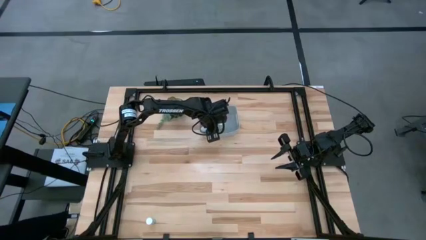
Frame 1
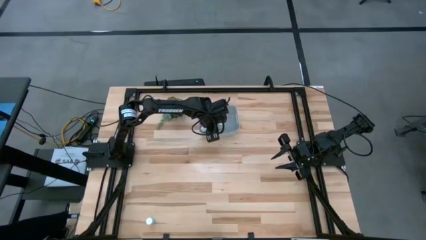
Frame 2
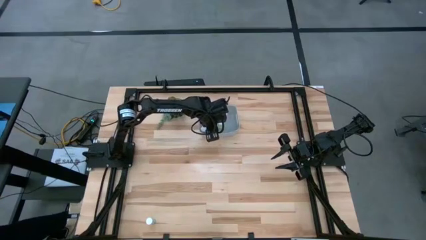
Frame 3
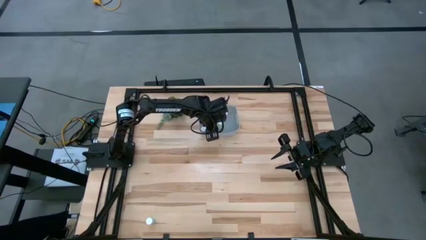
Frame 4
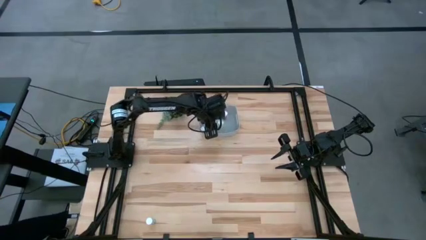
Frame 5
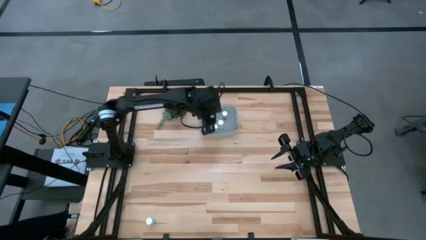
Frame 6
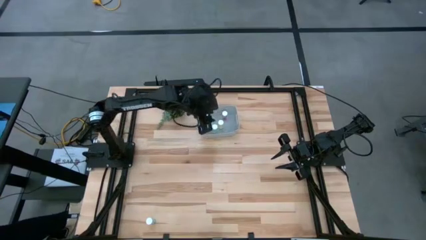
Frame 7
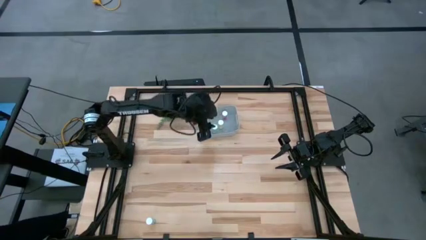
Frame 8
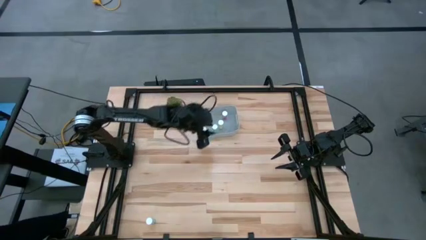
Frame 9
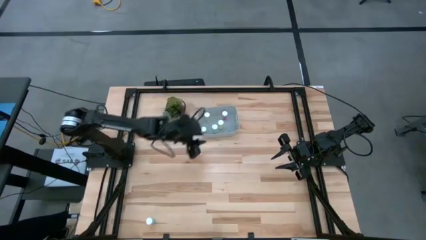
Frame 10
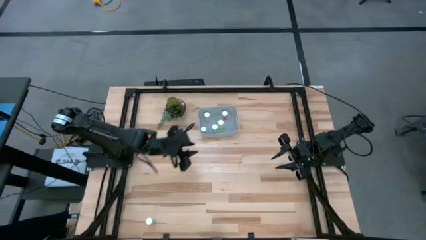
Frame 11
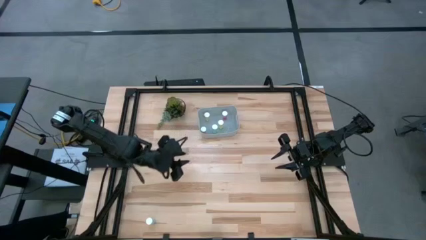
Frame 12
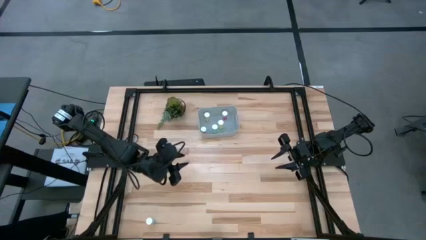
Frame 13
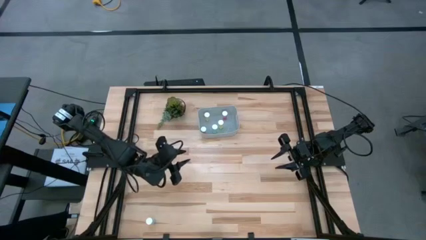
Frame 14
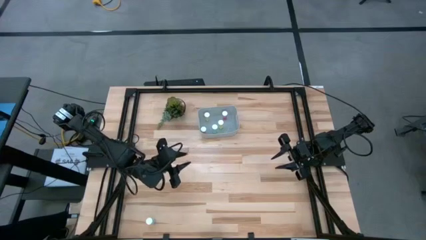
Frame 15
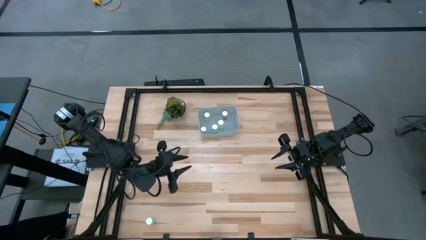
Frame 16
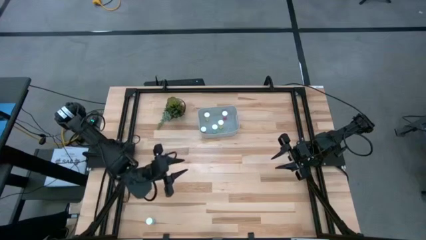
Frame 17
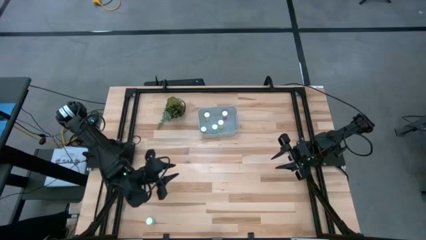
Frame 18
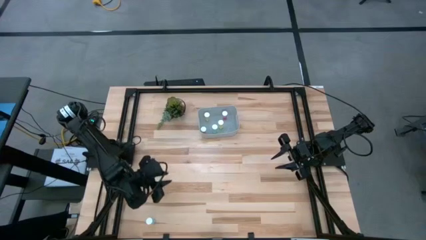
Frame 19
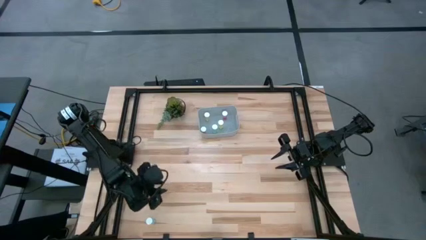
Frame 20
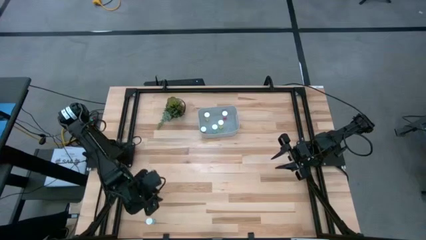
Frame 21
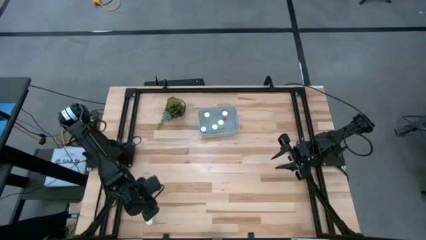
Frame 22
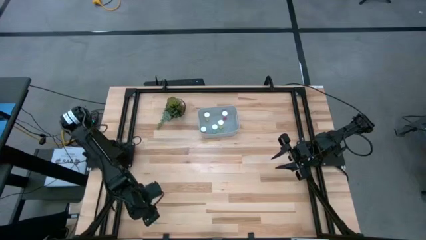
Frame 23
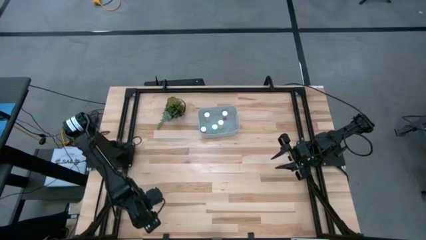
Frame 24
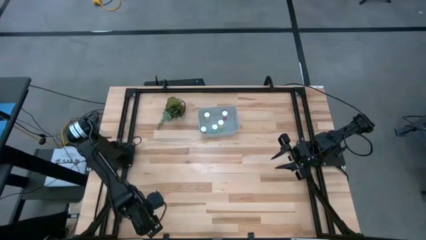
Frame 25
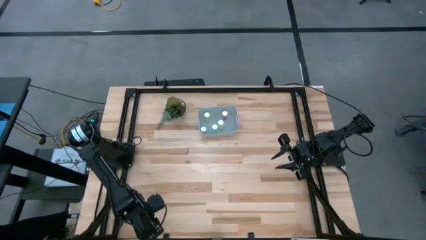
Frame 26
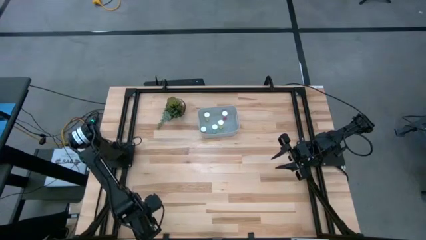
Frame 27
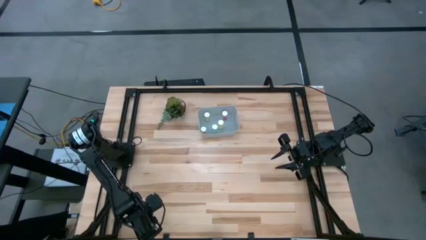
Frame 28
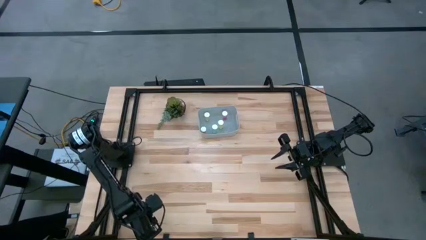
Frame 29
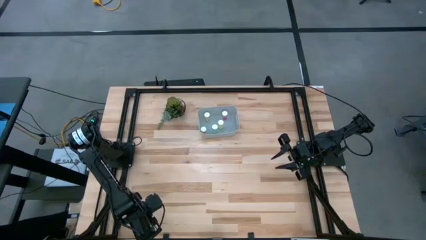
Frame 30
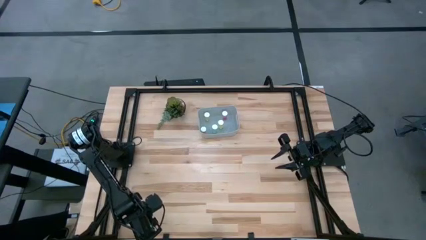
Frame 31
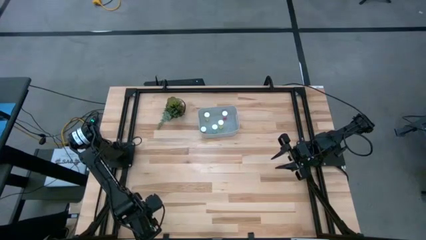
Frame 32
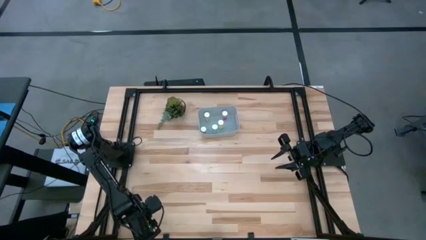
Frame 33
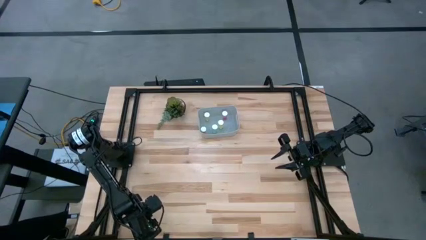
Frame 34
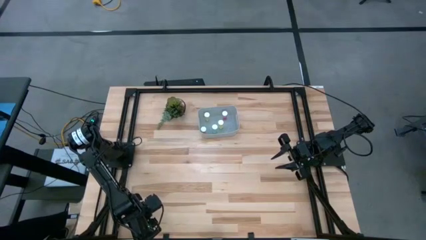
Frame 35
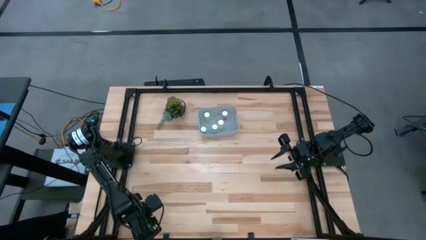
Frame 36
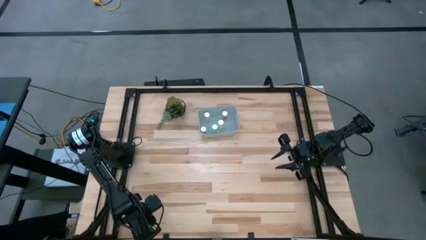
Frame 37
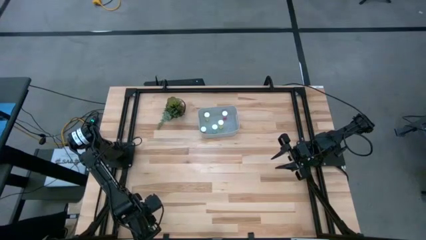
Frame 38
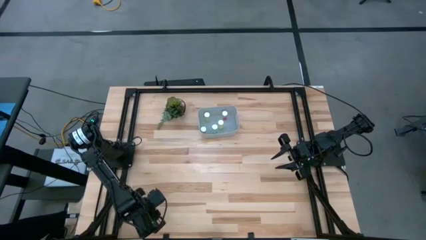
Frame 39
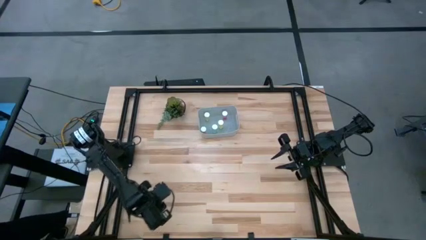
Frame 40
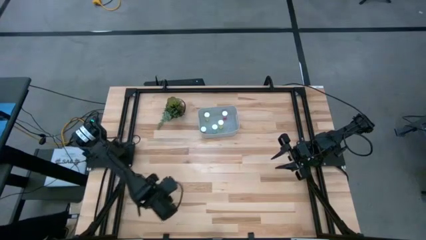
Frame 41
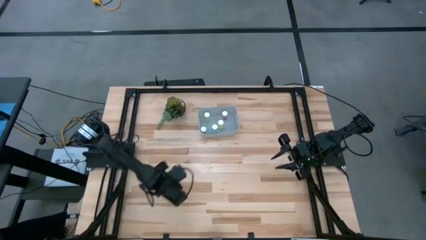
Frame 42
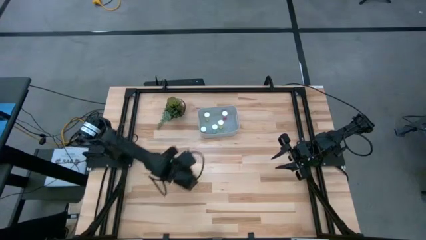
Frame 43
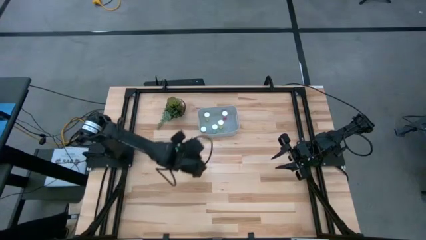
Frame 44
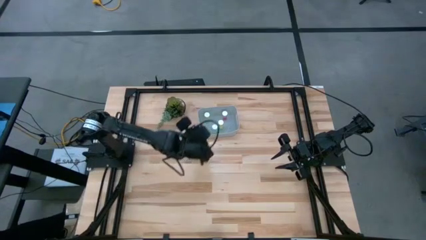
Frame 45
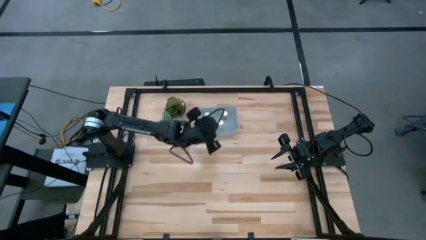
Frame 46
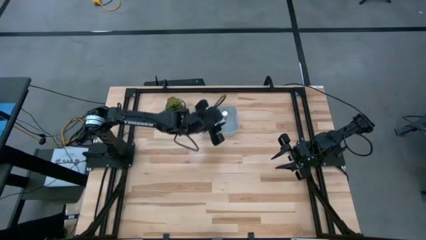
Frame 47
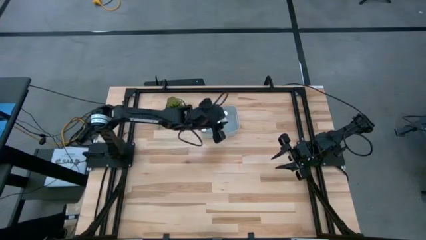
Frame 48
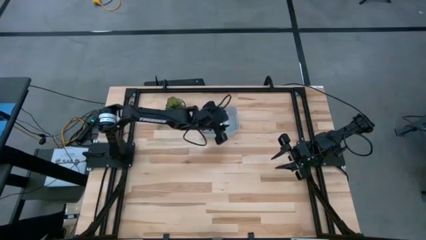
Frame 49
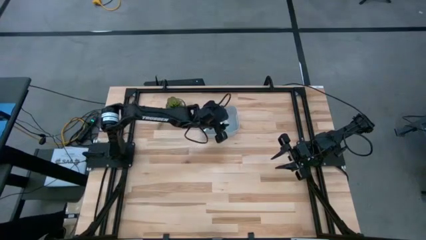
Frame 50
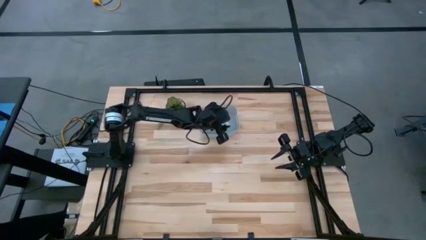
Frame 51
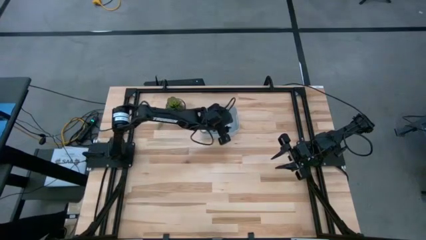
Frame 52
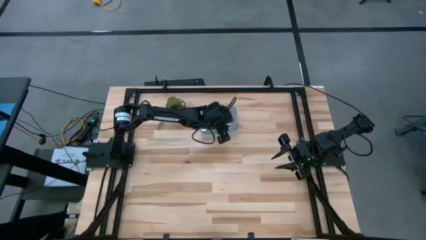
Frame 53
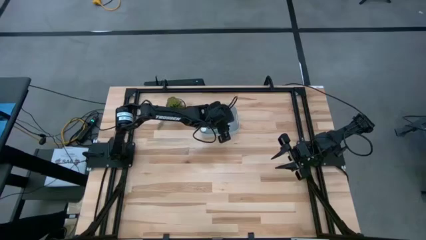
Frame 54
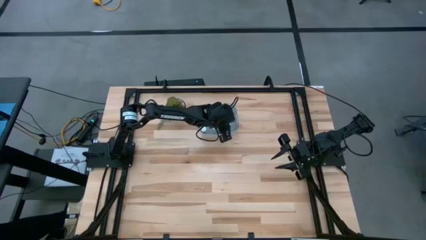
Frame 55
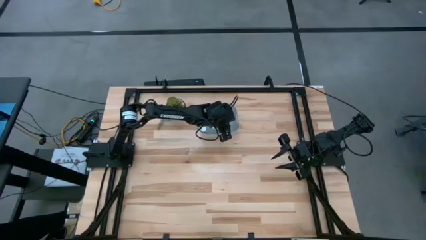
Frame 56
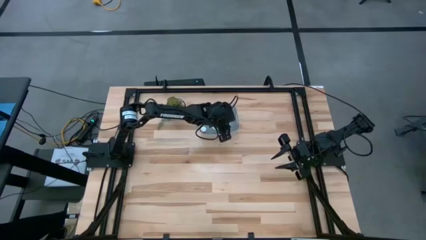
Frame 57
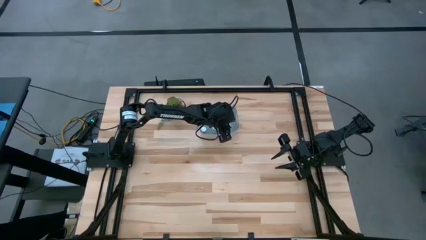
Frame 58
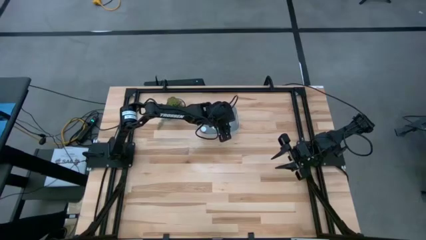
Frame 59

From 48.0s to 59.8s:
Task: Pick and place pill bottles into a basket
Put the blue pill bottle into the bin

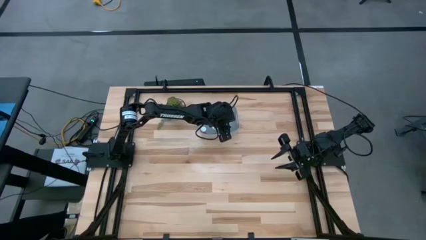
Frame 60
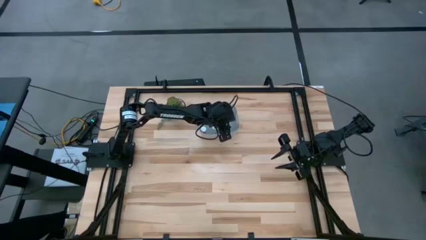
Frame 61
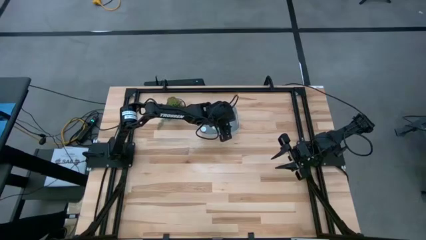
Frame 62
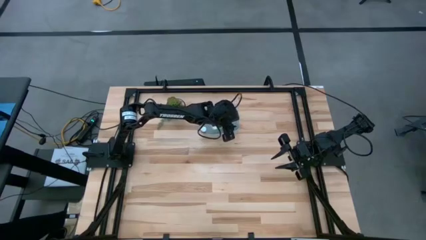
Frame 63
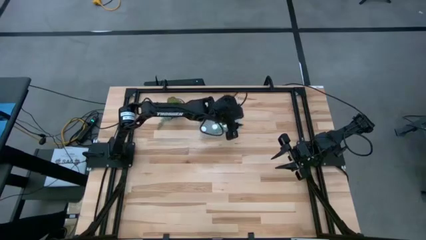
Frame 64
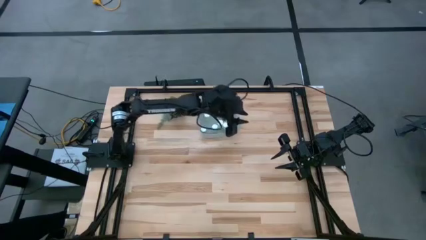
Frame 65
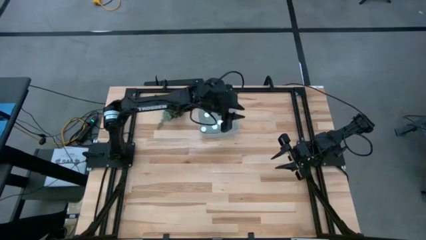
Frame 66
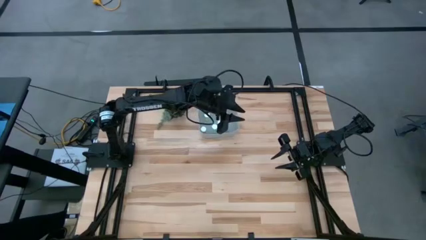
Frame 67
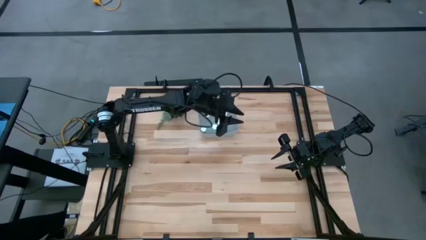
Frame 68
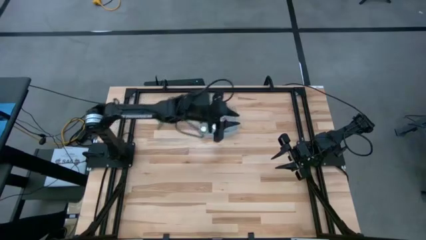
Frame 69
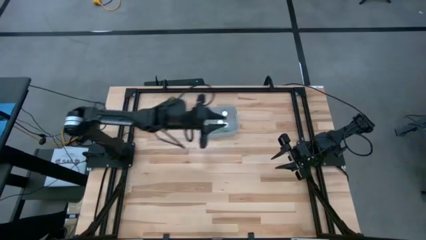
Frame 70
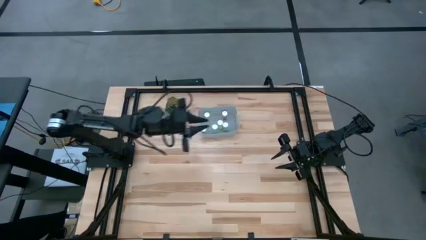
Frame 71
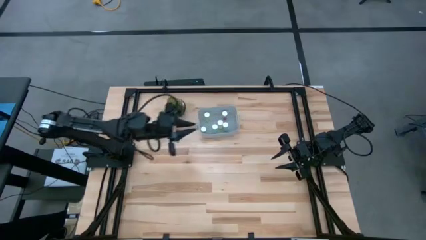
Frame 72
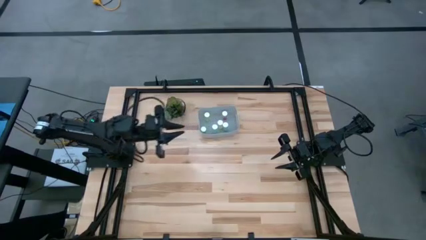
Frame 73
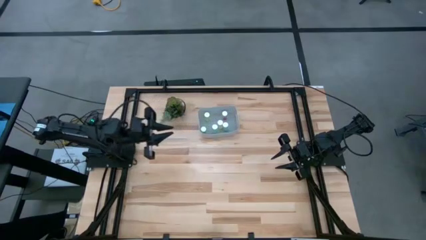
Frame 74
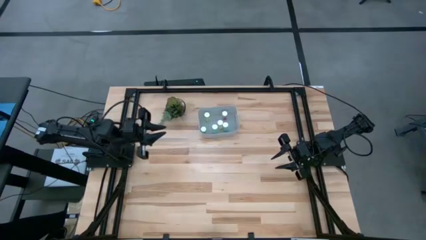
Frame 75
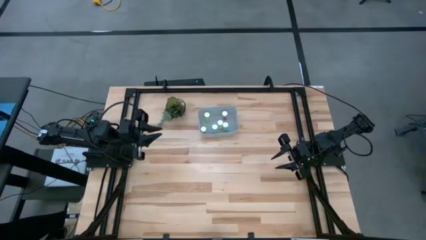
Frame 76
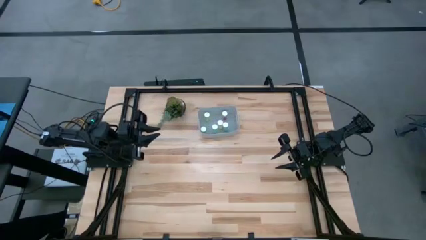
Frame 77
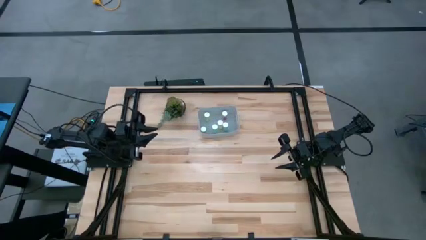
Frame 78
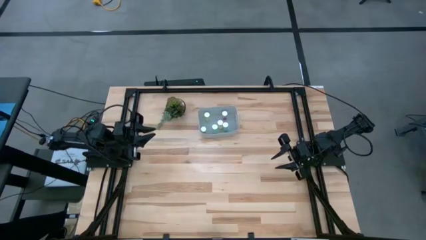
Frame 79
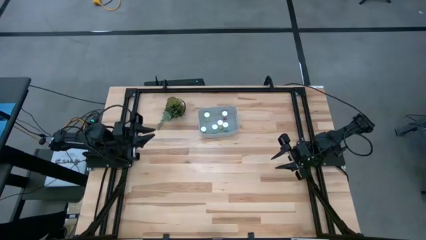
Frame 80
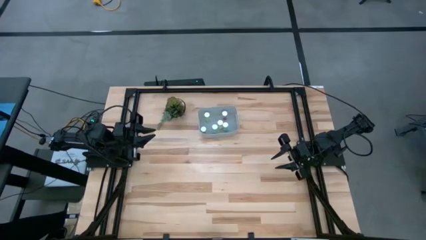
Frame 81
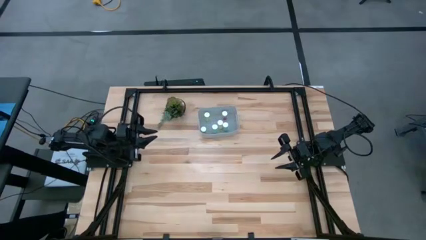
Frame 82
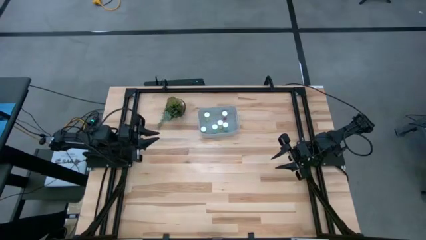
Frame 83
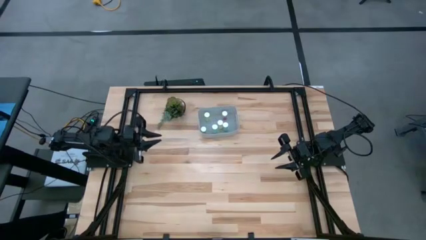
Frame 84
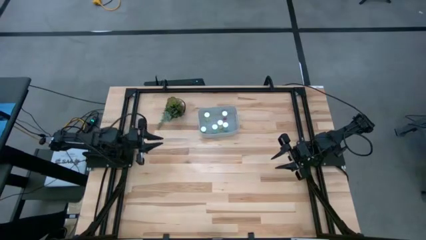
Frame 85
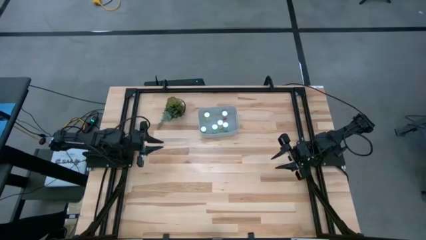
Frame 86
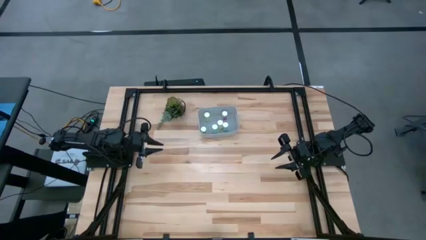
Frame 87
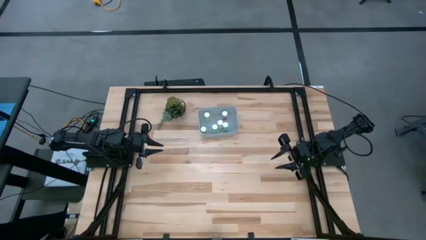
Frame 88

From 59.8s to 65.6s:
Return to Home Position
